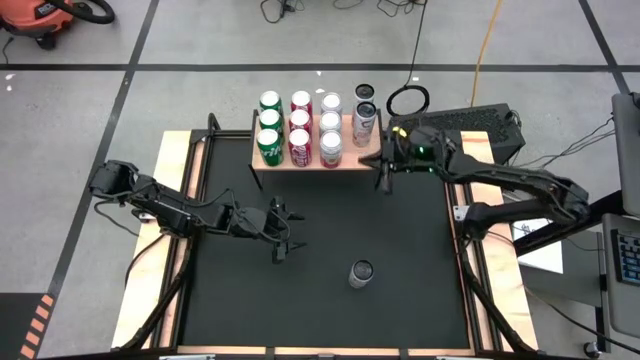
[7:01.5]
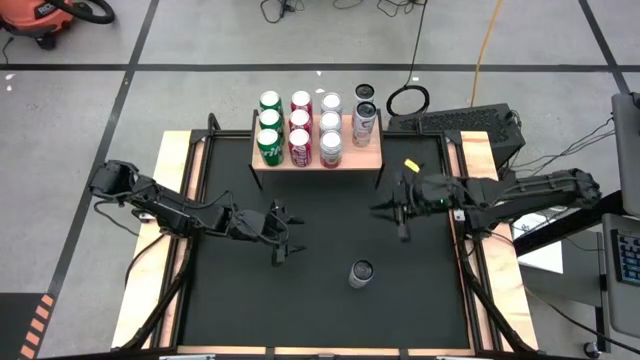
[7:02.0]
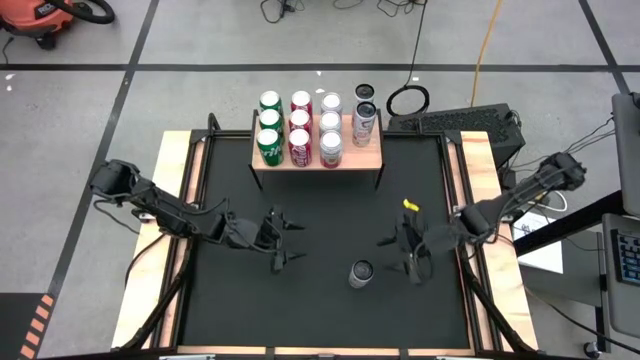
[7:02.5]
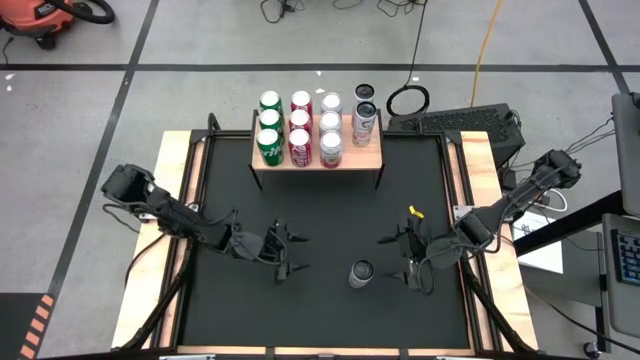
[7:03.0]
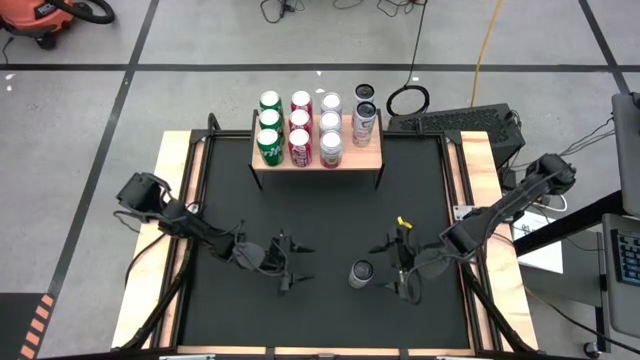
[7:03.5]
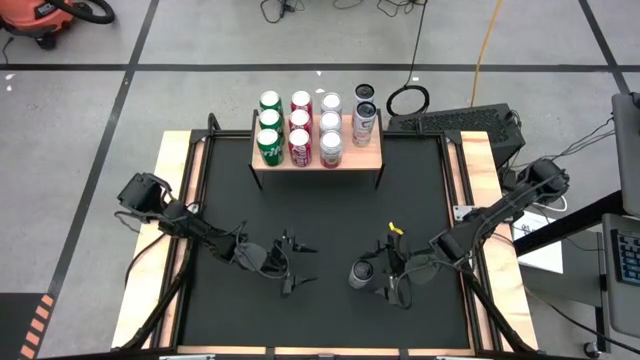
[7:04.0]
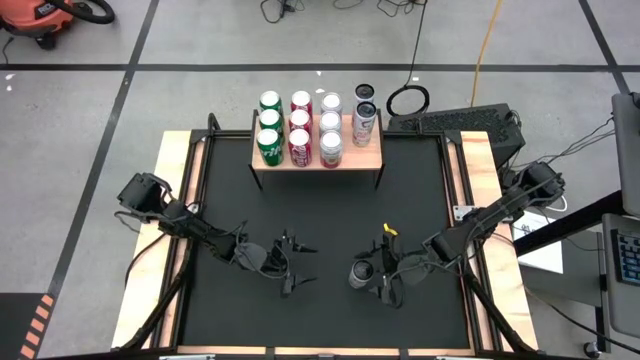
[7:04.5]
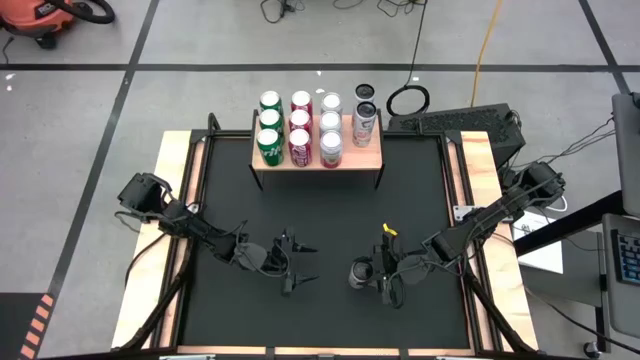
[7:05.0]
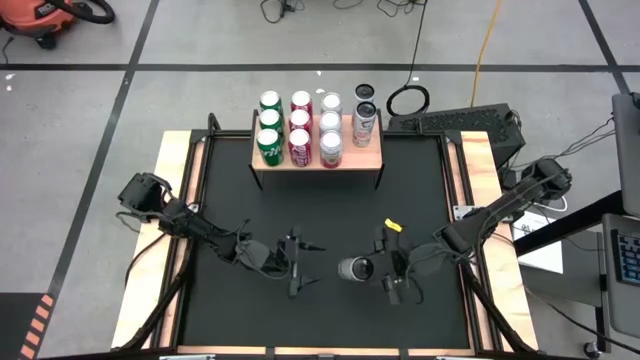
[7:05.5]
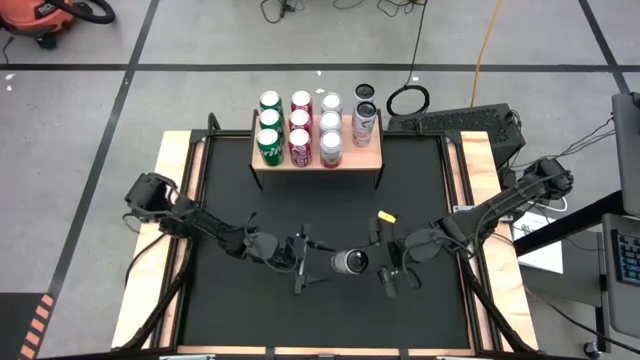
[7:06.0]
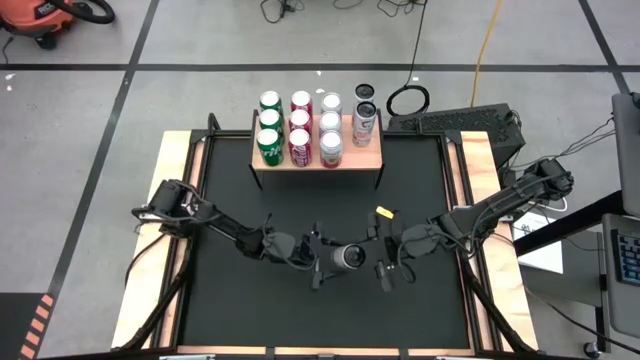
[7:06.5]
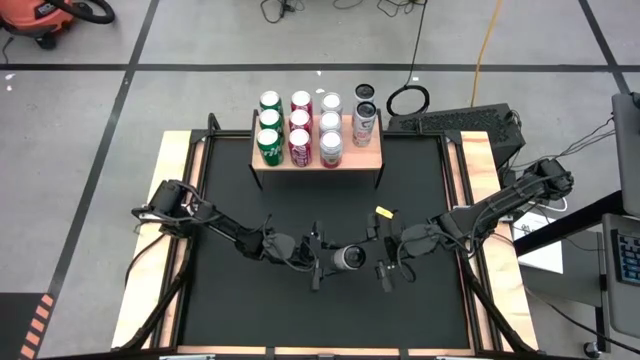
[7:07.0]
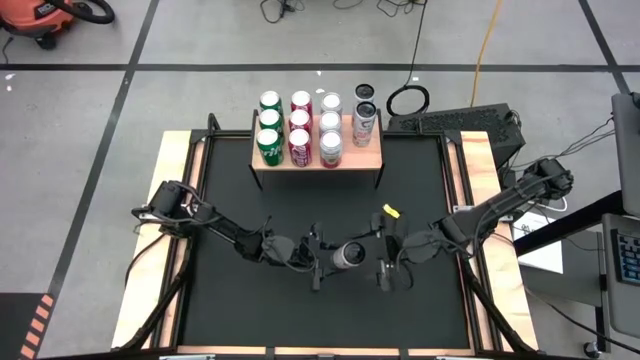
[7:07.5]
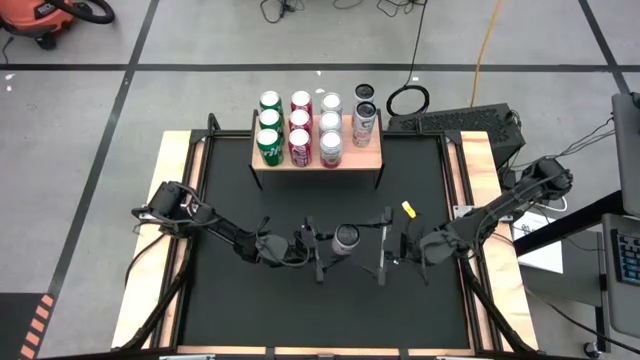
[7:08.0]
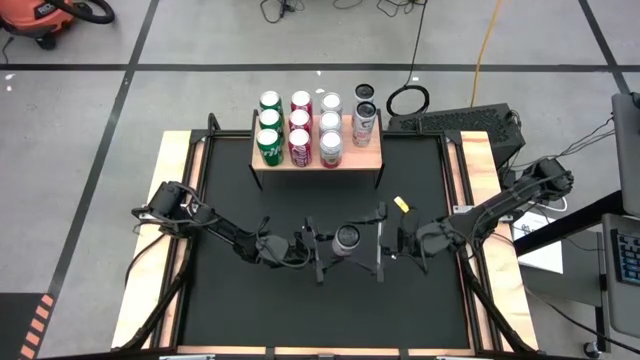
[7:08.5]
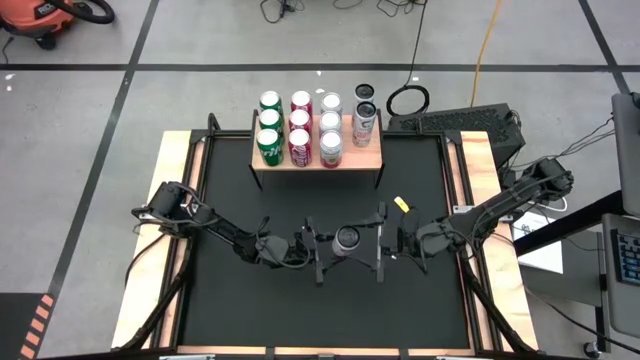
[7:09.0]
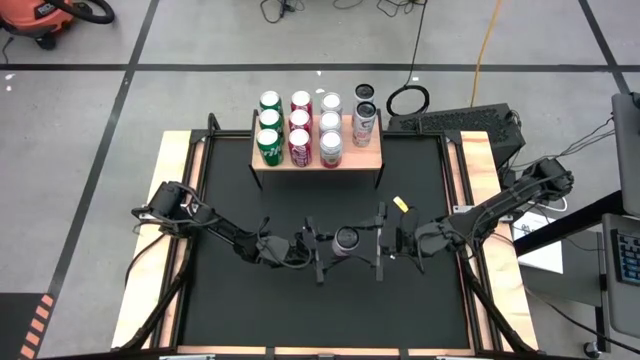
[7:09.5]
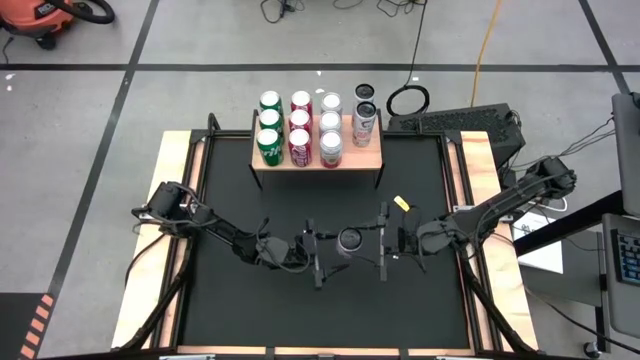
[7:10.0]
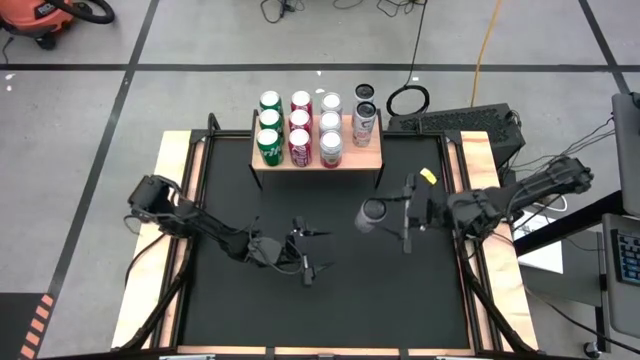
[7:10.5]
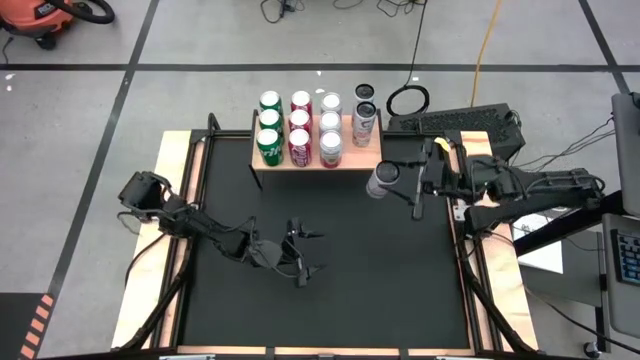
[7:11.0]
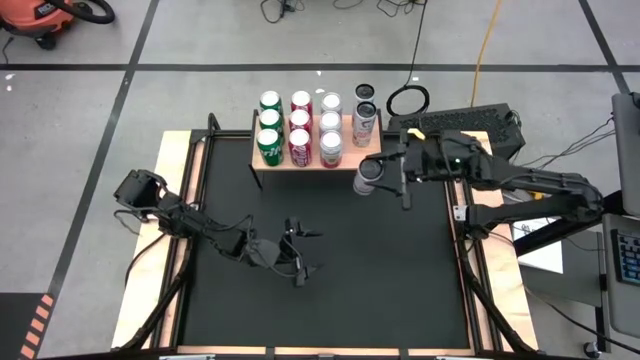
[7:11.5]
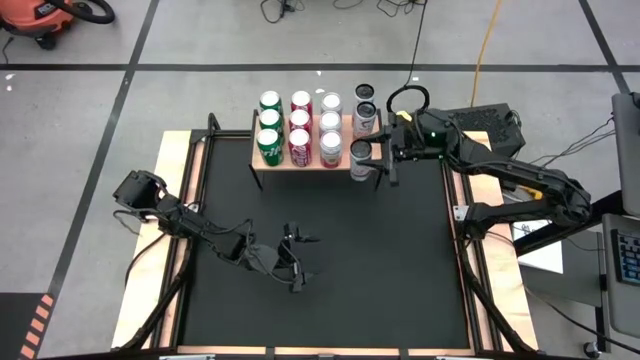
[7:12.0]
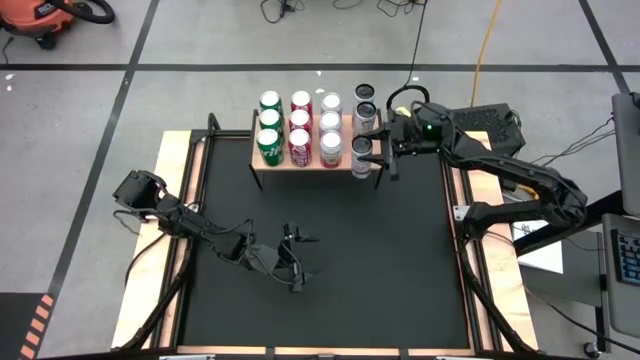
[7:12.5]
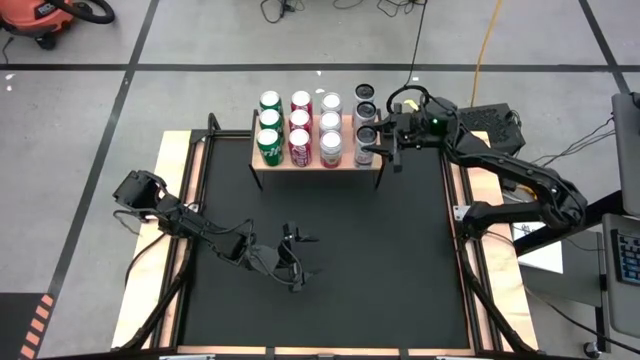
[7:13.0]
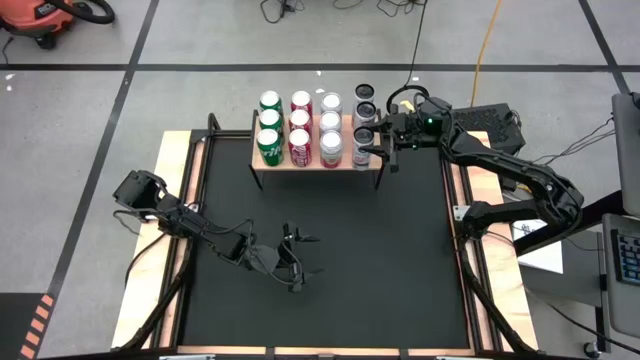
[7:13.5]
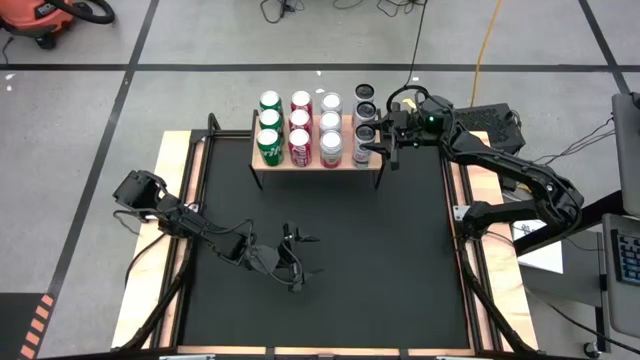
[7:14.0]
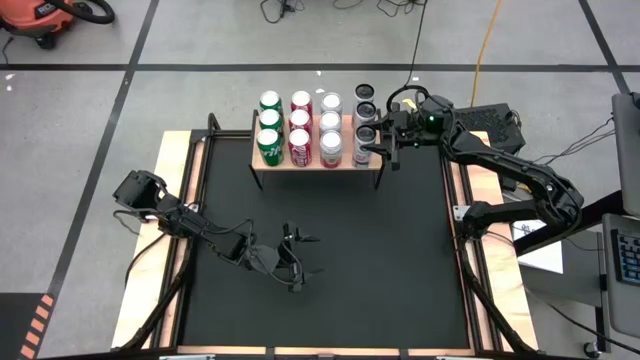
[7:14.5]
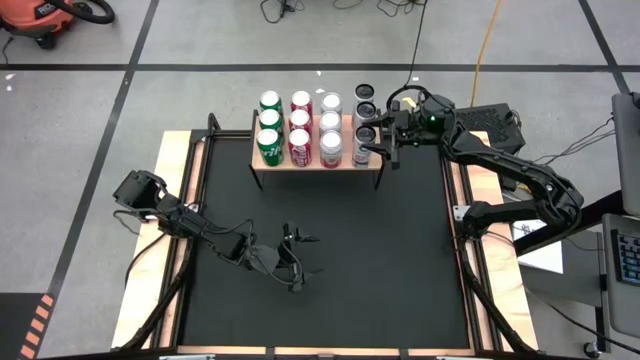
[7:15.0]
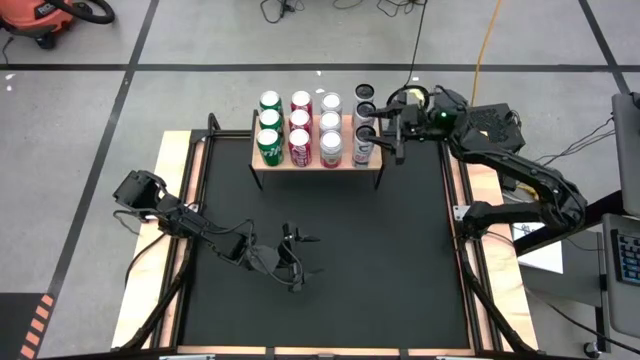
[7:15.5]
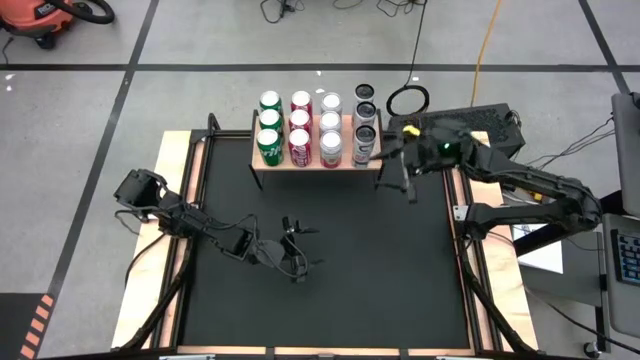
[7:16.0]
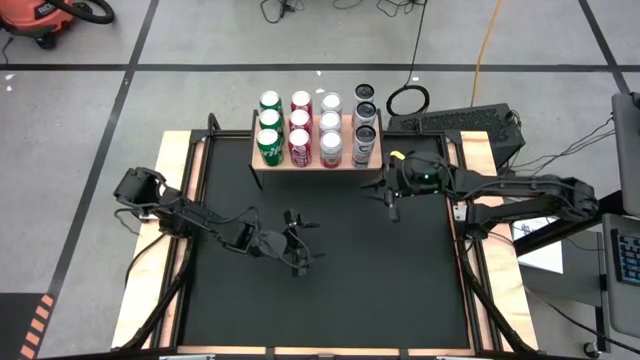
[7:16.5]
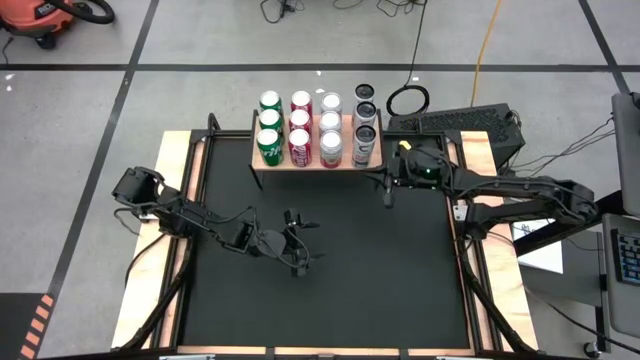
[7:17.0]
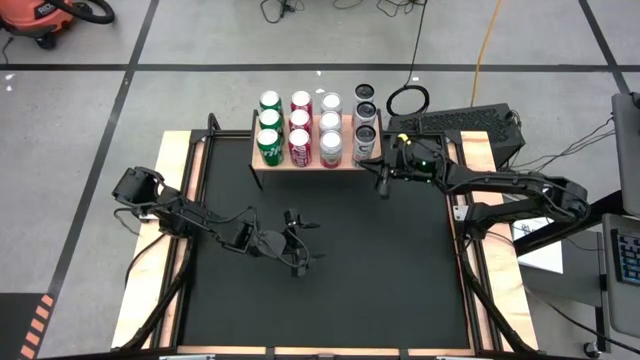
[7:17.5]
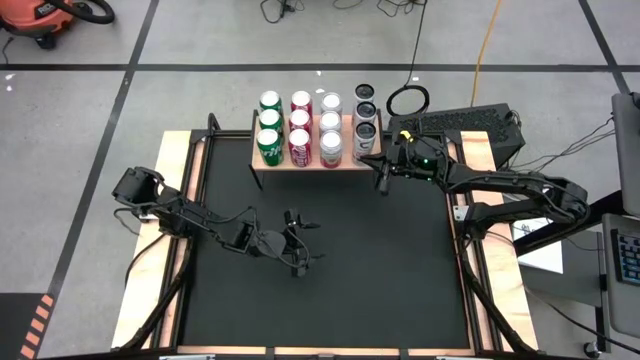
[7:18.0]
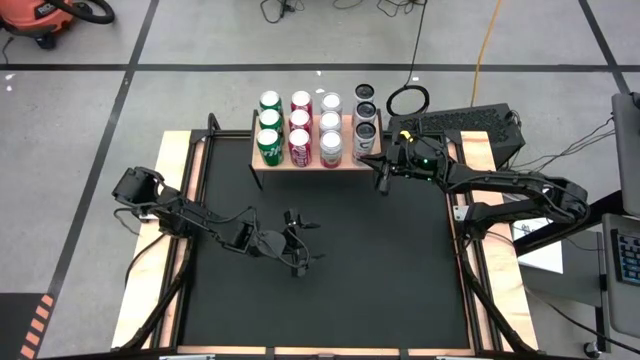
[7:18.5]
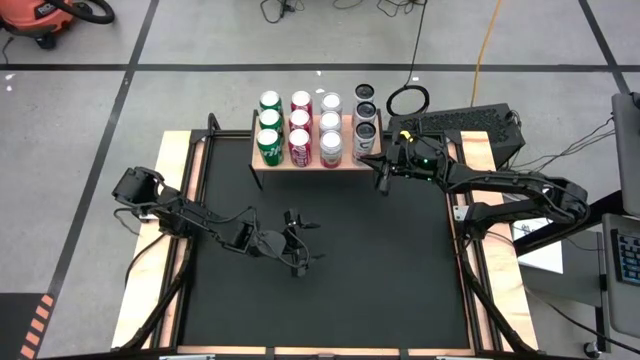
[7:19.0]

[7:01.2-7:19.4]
Task: Place canned beverage on shelf
Put the white soda can on the shelf aligned with the other white soda cans

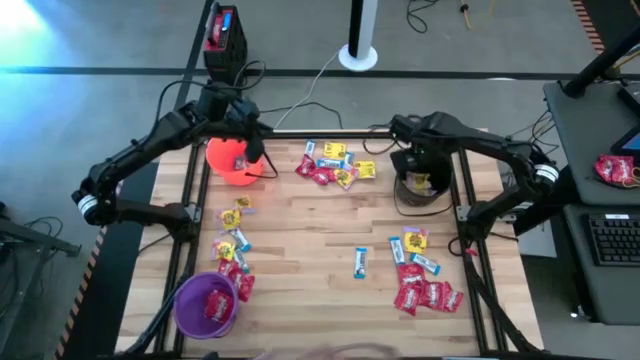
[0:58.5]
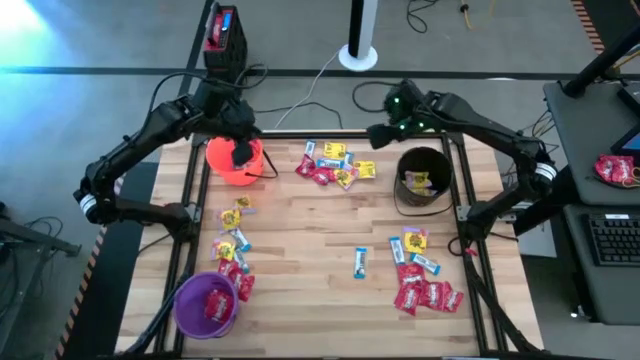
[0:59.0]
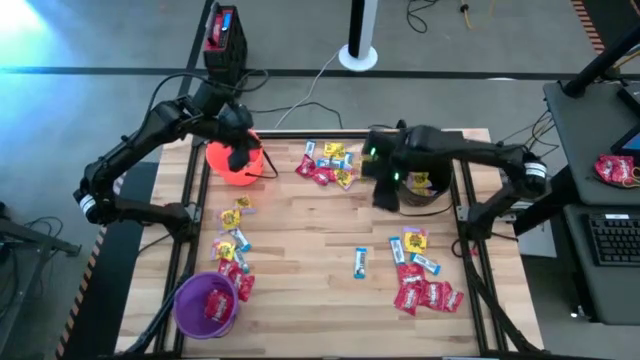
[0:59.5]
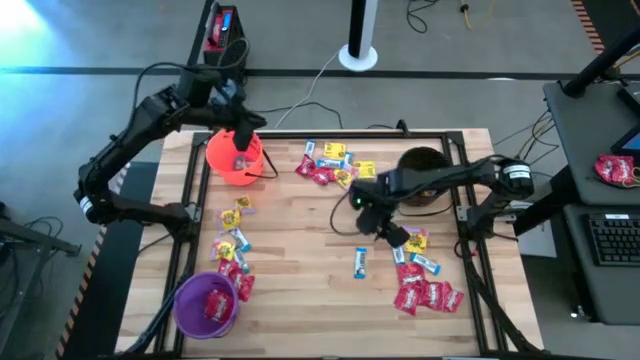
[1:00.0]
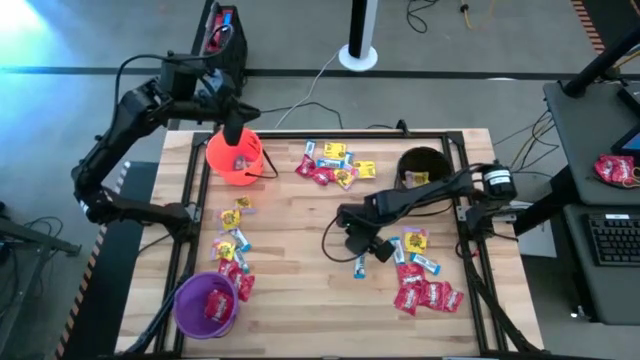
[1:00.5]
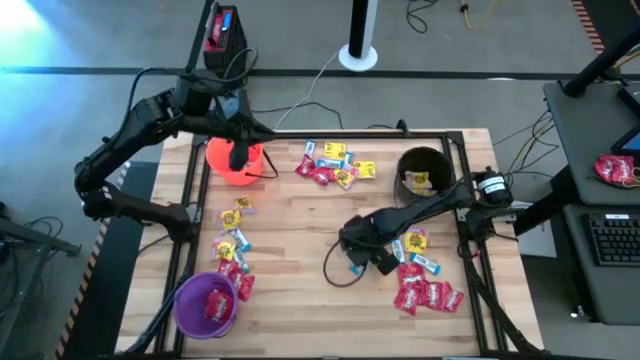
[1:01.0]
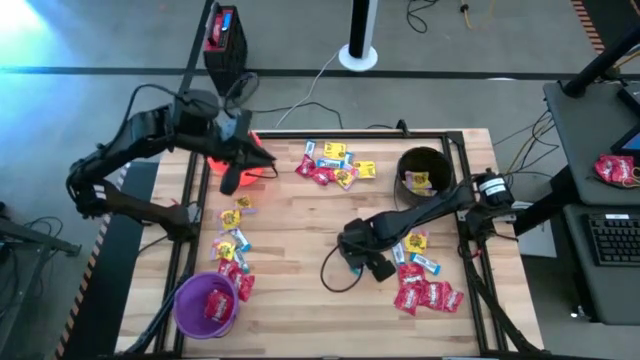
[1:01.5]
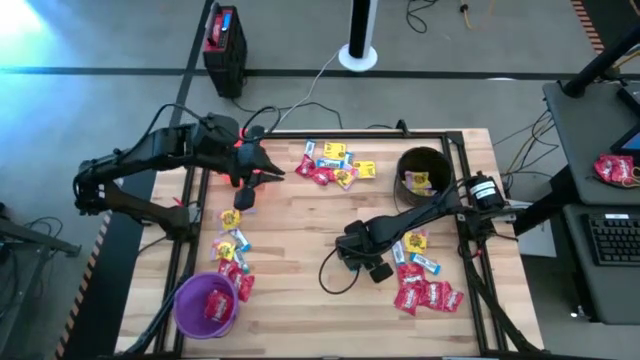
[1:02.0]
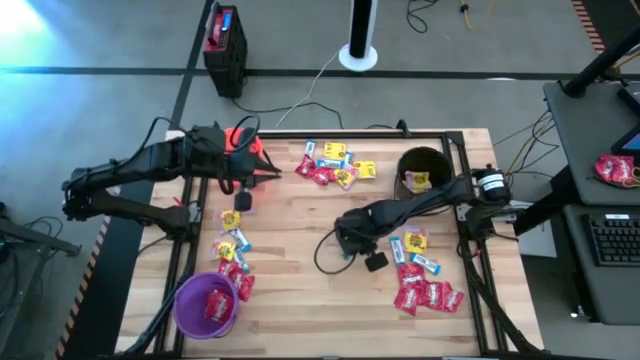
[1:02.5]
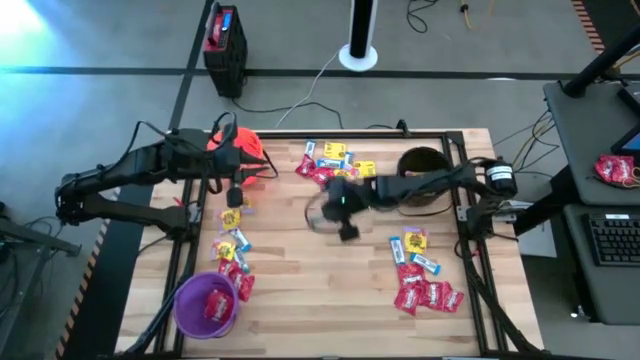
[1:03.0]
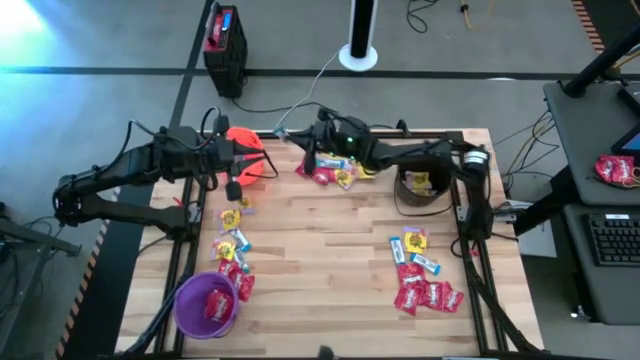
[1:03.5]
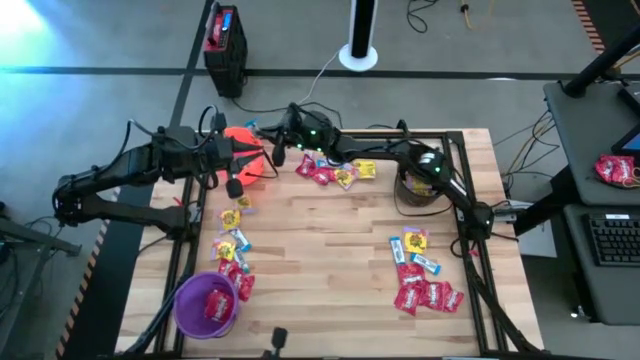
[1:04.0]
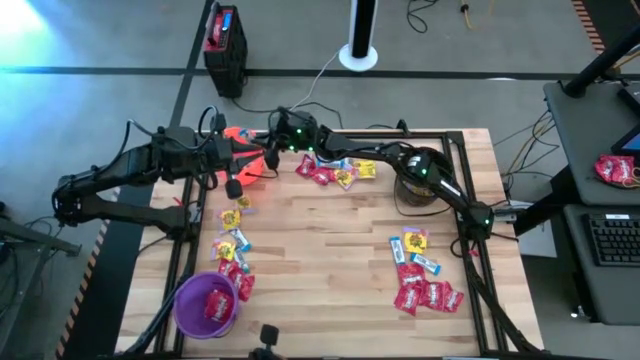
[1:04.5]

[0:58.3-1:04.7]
Task: Sort candy by brand, put in halloween buckets
Put the white chocolate bar into the orange bucket
